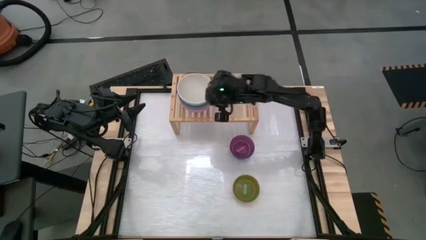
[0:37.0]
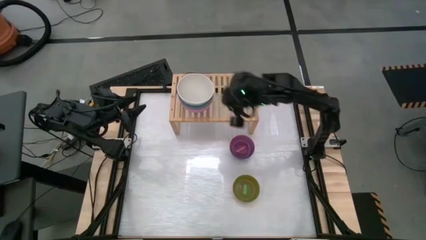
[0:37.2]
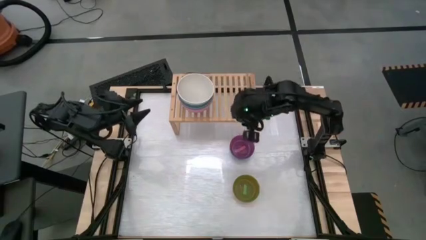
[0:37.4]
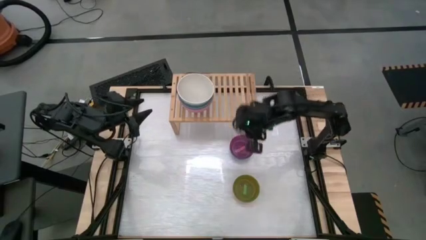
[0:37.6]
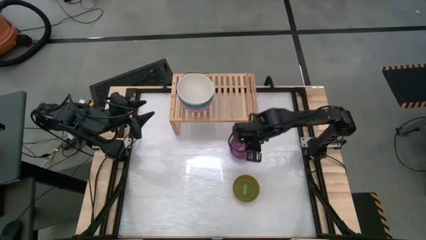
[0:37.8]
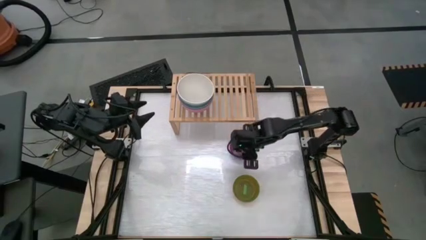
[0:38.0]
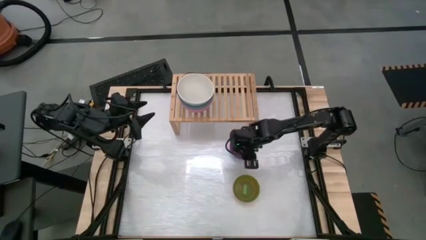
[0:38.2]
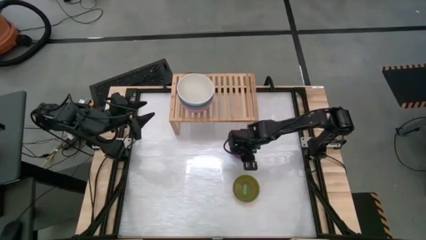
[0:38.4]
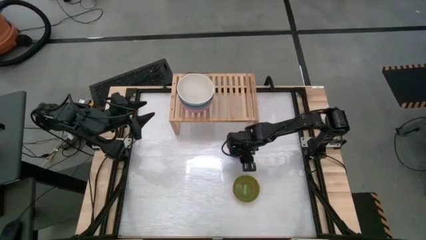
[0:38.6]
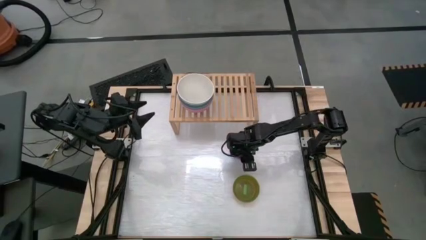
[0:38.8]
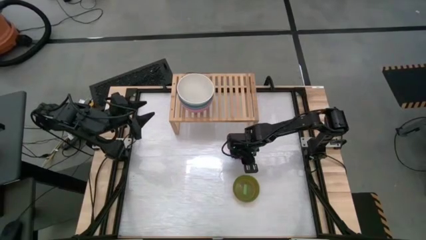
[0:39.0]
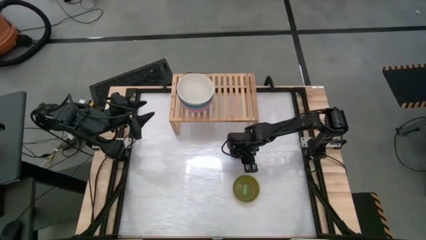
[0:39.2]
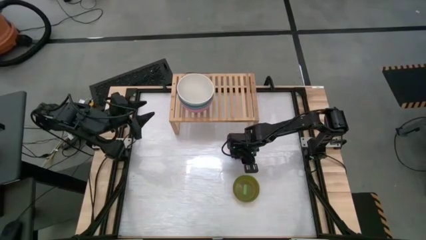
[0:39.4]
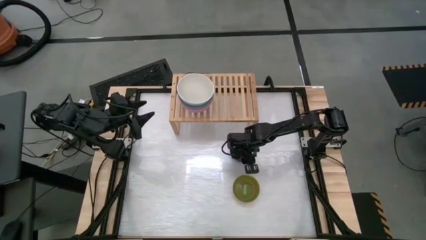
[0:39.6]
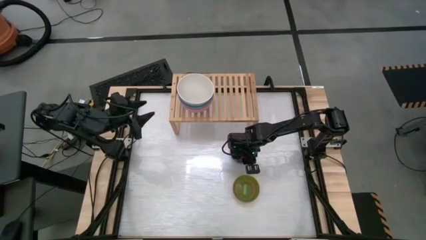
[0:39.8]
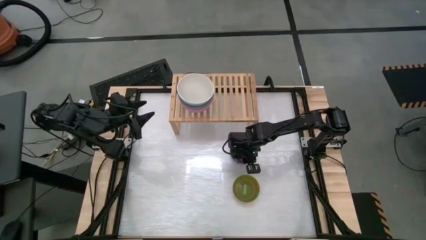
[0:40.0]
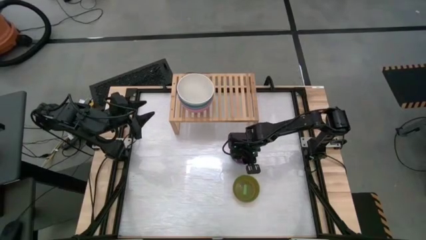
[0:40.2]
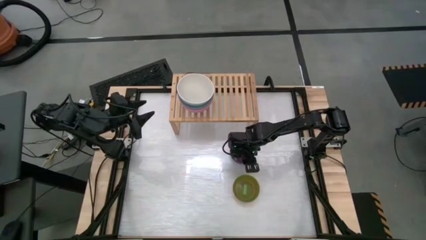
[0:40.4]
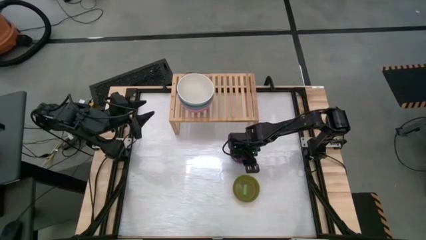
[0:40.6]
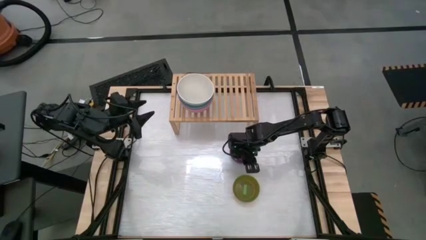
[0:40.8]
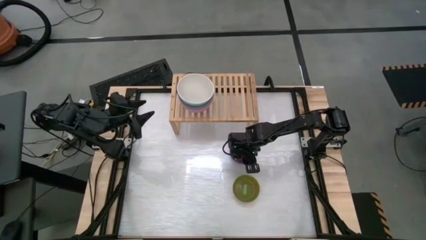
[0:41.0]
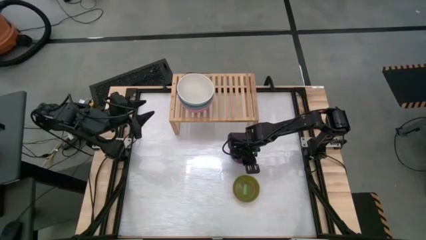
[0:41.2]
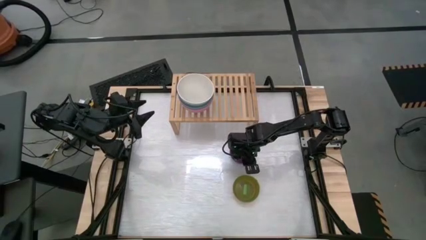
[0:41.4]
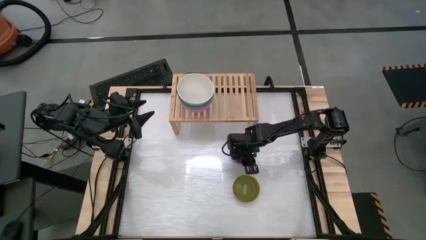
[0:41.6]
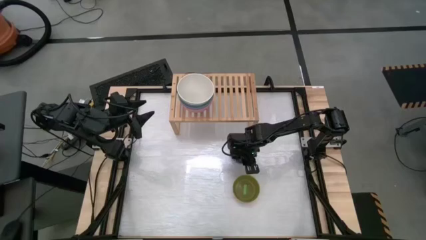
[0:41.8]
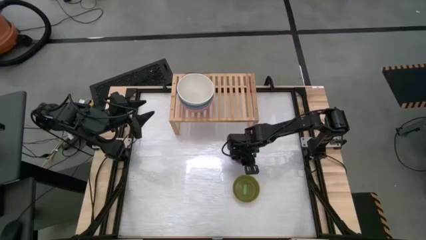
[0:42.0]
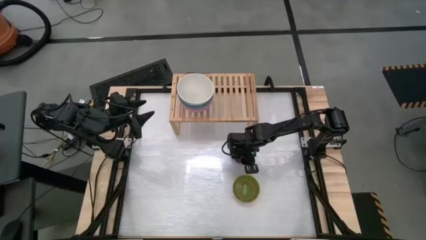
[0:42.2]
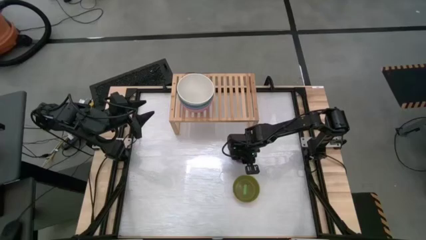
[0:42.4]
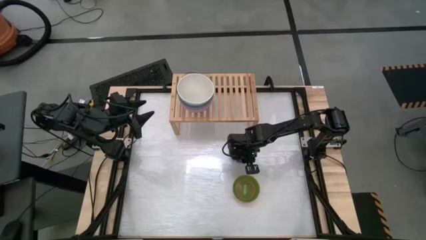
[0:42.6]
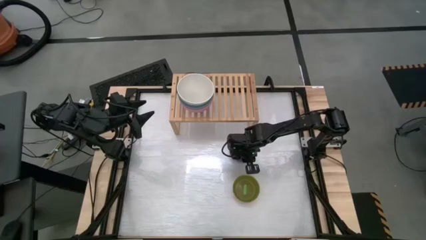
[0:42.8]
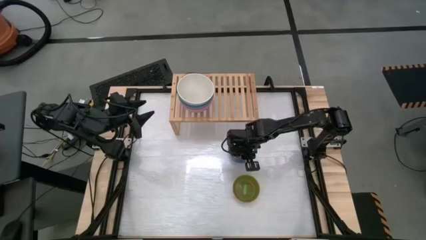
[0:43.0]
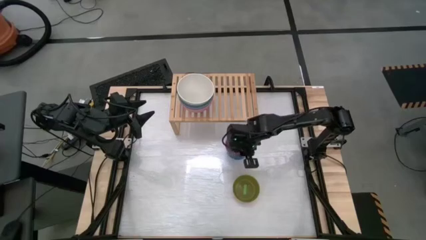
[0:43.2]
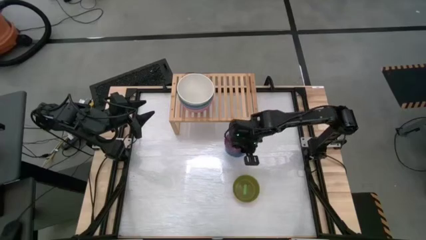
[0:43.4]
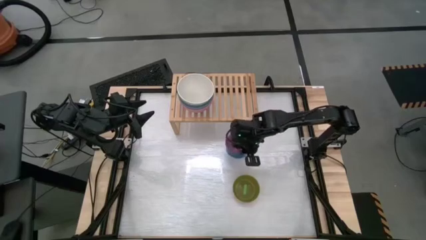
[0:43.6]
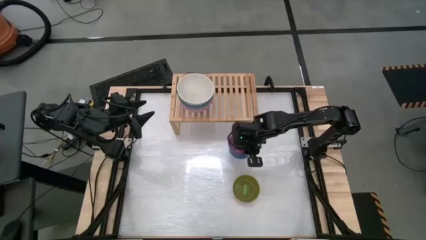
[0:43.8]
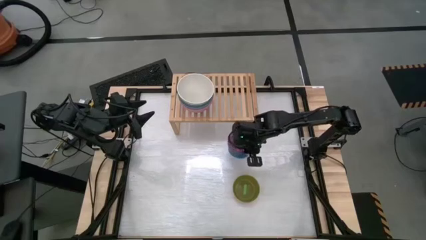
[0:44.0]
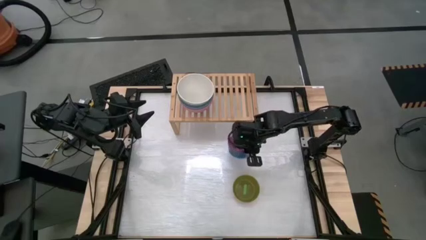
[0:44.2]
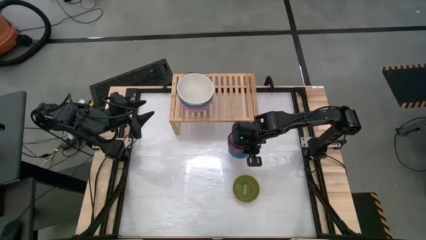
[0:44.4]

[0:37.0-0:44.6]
Task: Place and stack bowls onto a shelf
Put the pink transparent bowl on the shelf

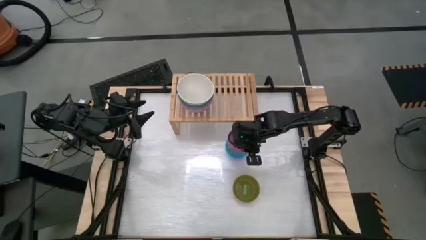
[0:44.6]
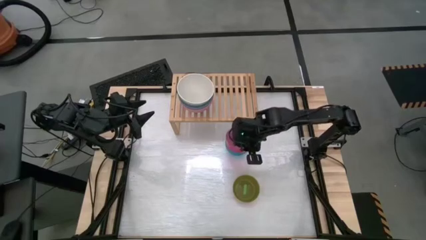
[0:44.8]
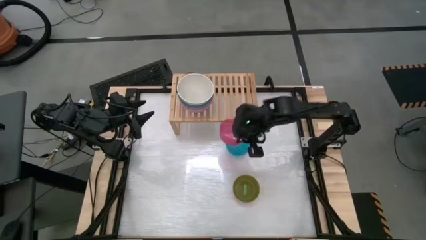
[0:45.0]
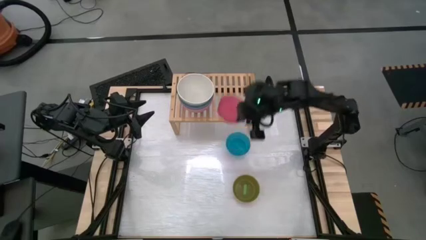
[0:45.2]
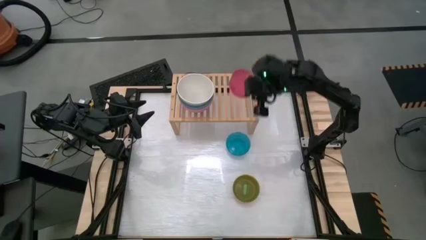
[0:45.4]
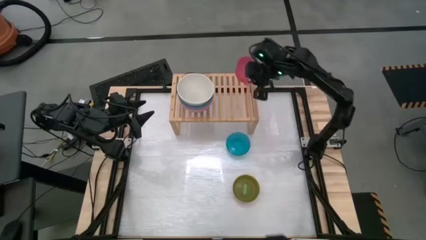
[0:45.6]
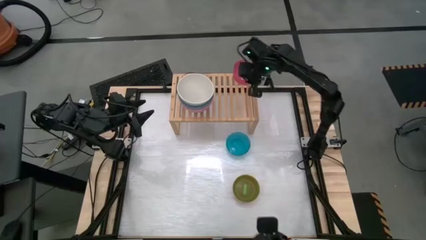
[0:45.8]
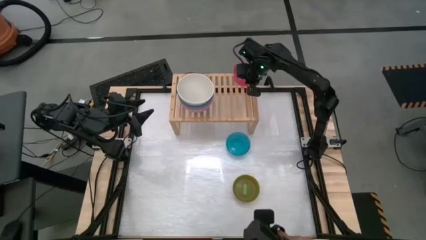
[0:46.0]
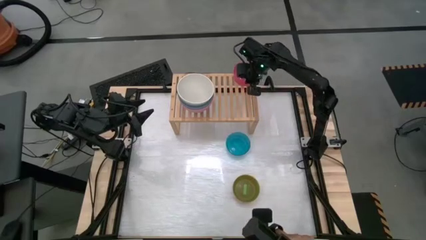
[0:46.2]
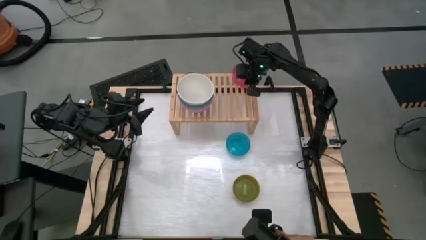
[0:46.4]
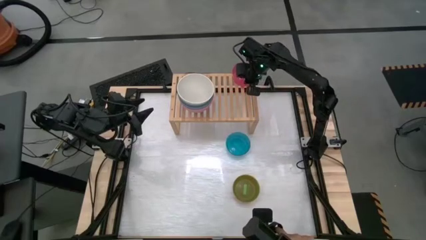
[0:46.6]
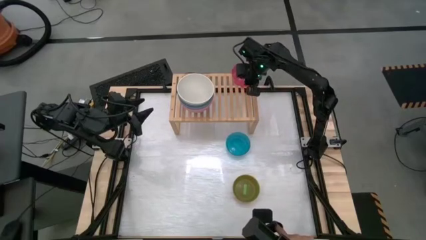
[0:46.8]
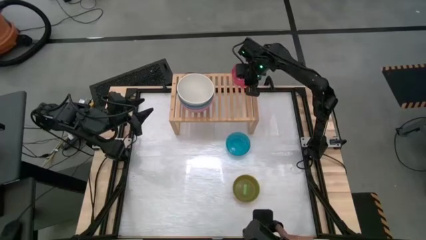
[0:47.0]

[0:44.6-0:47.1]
Put the pink transparent bowl on the shelf

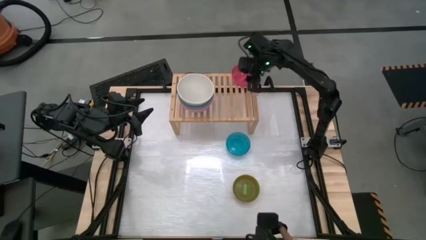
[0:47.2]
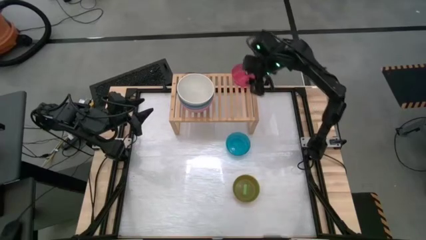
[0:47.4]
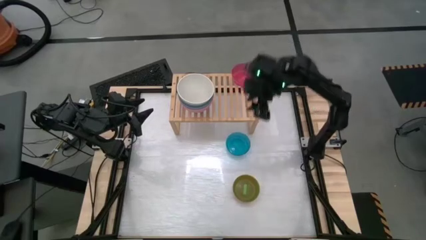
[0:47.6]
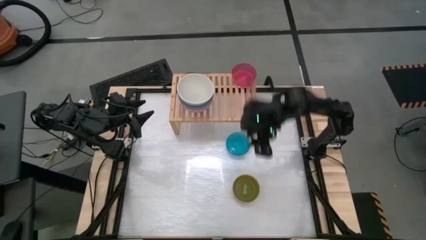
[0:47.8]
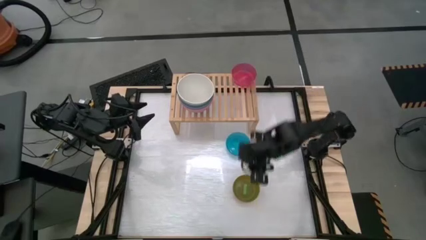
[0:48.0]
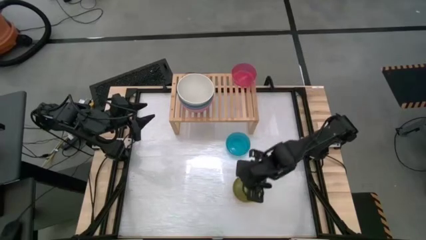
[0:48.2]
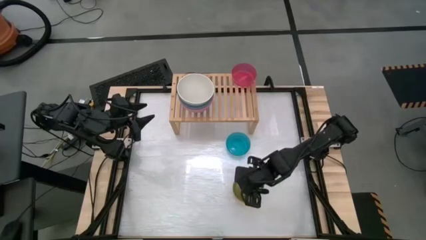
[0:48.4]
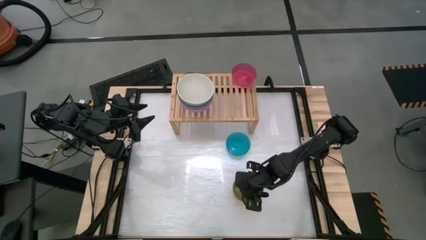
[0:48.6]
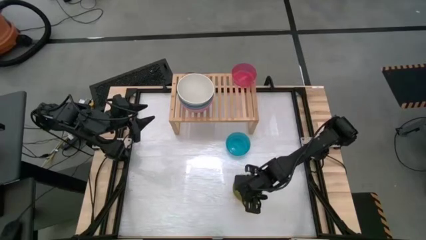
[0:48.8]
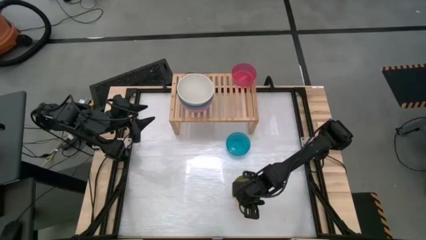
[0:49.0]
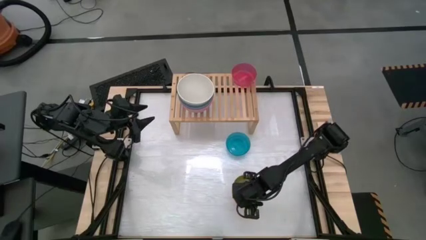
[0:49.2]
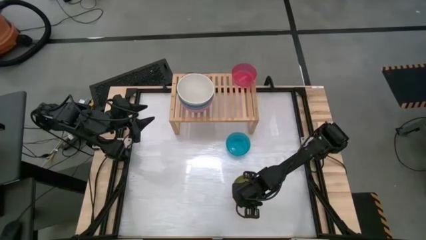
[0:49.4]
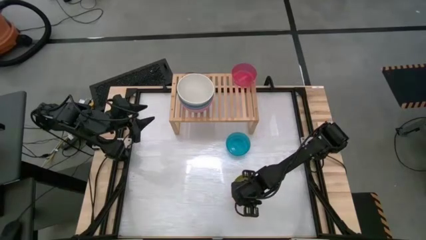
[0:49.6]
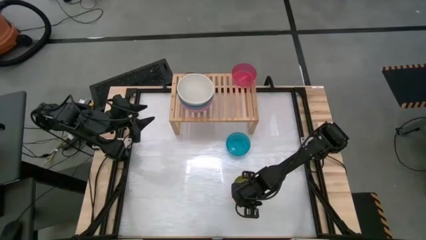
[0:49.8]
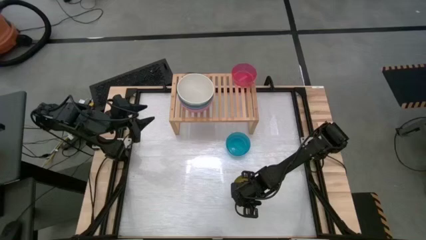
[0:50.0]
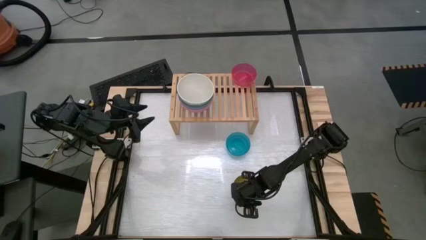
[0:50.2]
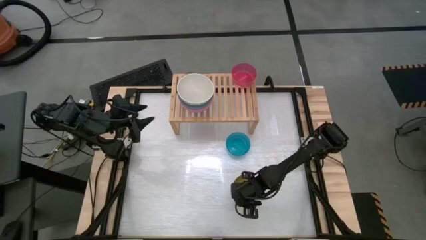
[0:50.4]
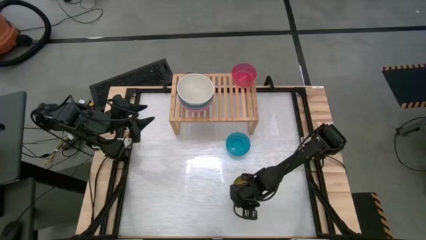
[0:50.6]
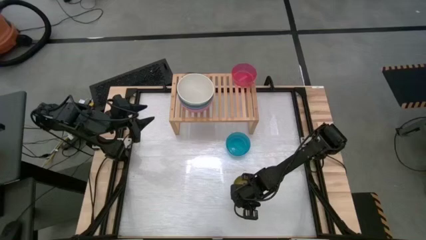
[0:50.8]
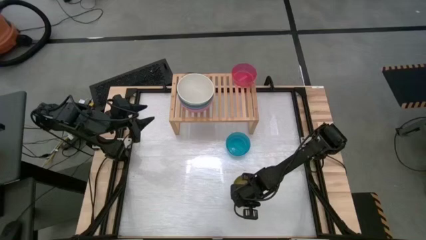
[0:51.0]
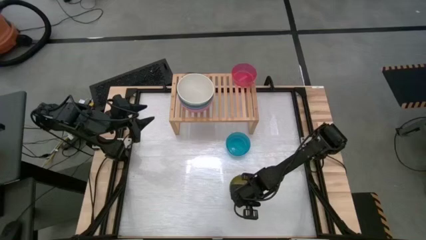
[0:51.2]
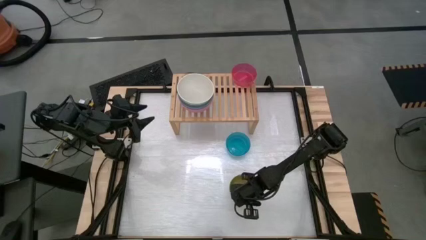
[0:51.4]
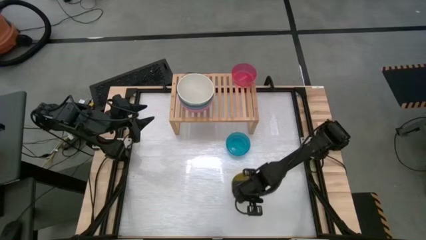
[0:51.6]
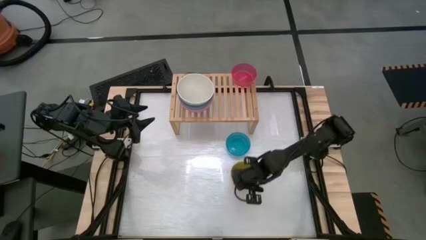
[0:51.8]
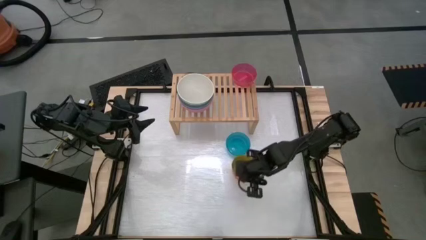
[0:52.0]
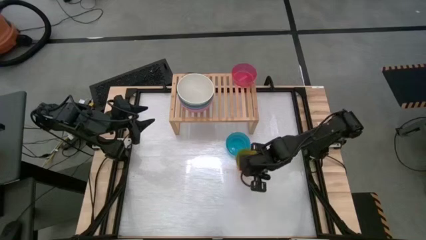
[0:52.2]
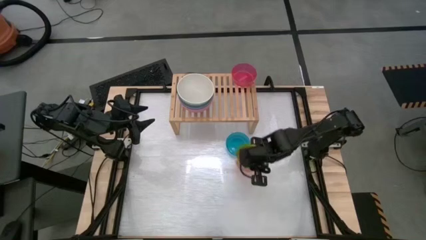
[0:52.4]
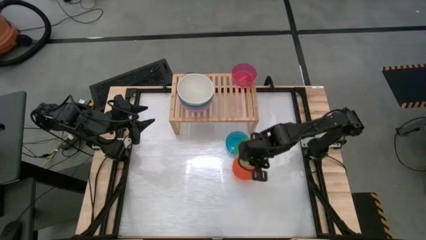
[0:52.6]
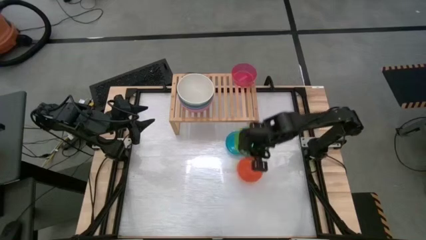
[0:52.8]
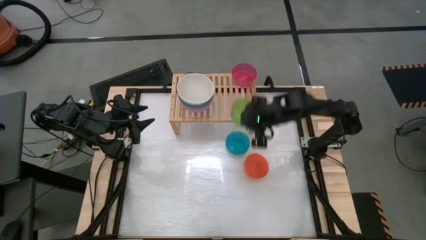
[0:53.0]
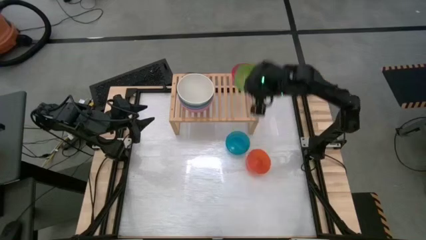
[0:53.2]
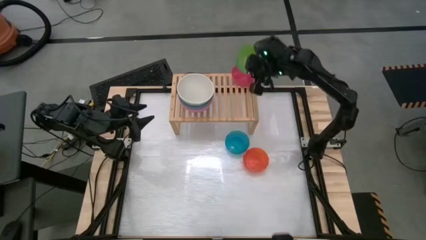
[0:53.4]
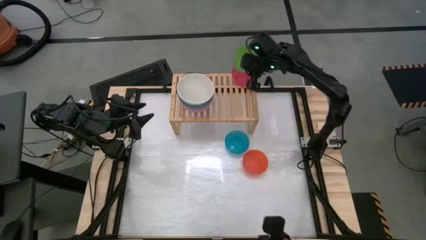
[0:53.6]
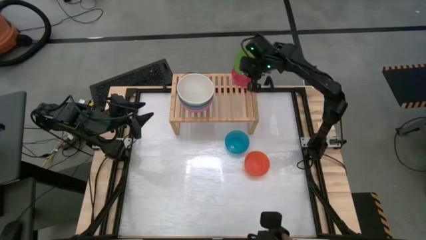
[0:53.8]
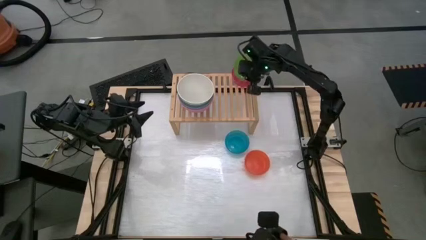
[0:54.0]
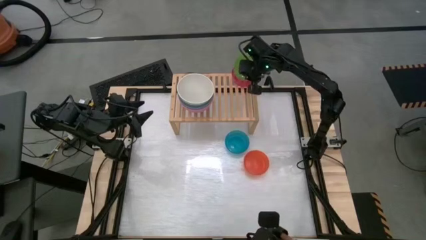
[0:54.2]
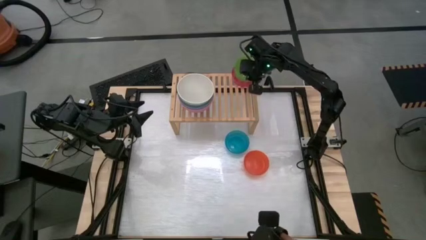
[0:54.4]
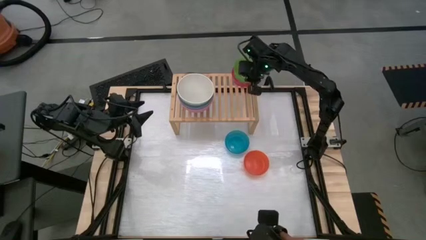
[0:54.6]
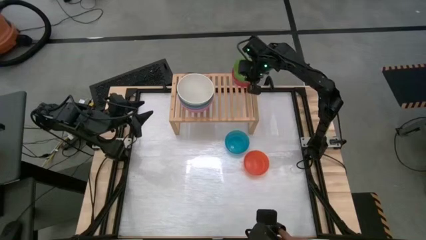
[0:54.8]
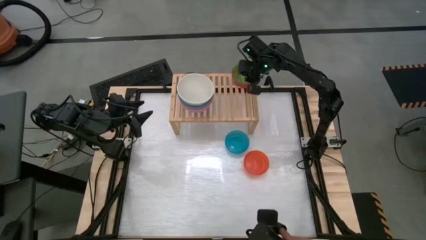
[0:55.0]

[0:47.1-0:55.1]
Stack the green transparent bowl on top of the pink transparent bowl on the shelf
